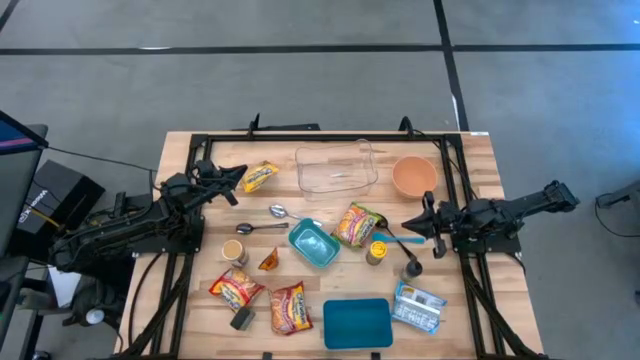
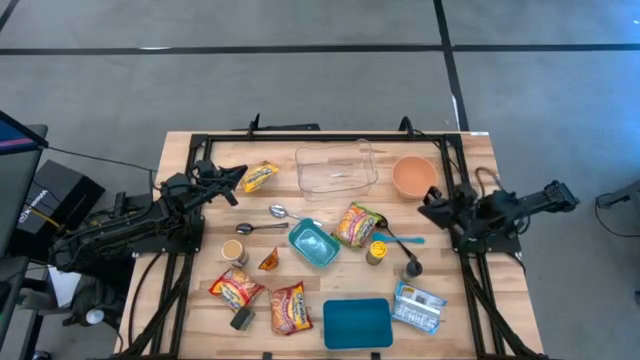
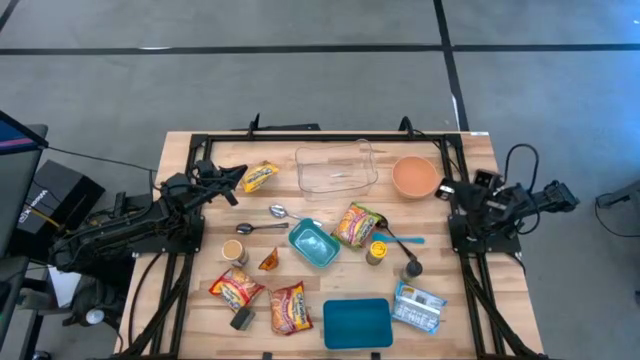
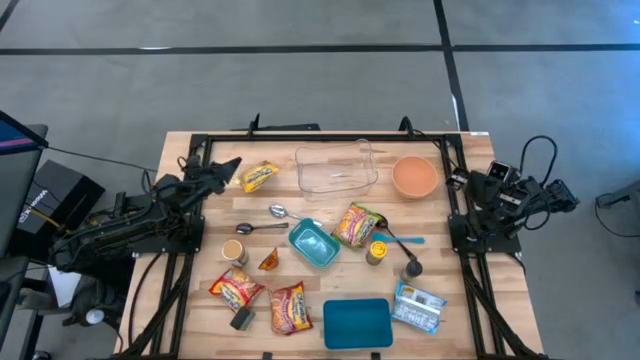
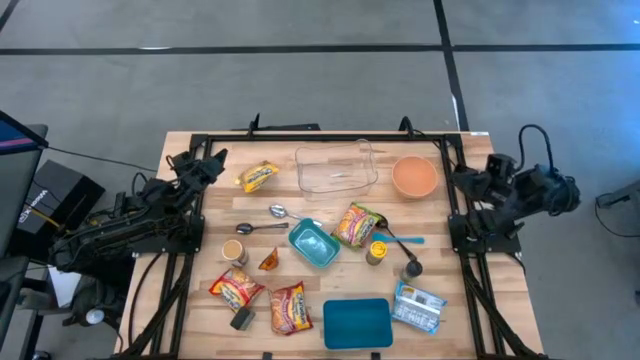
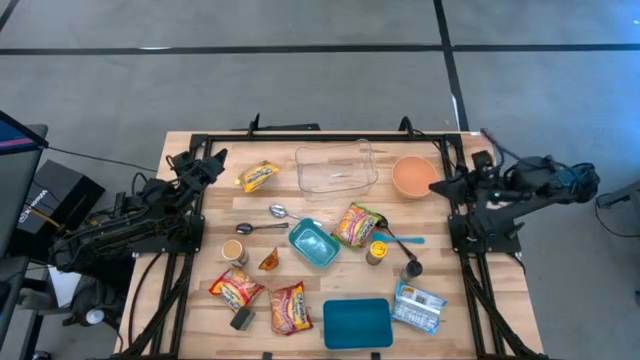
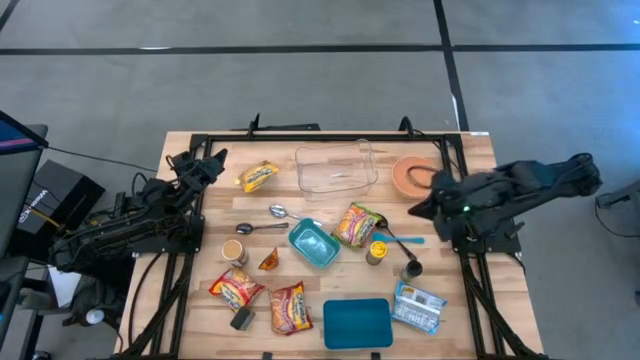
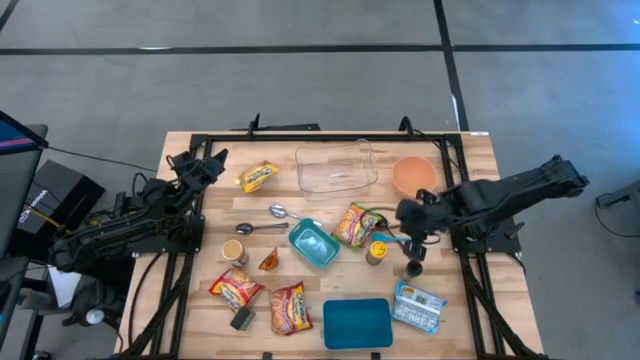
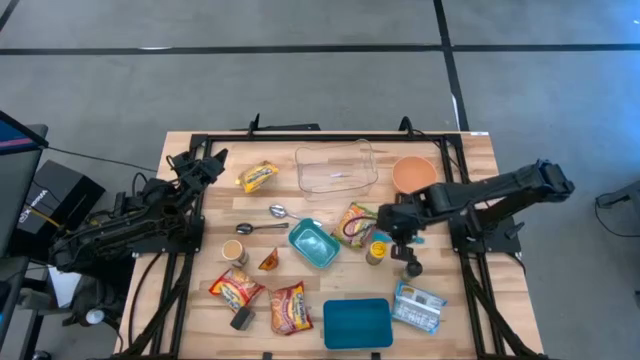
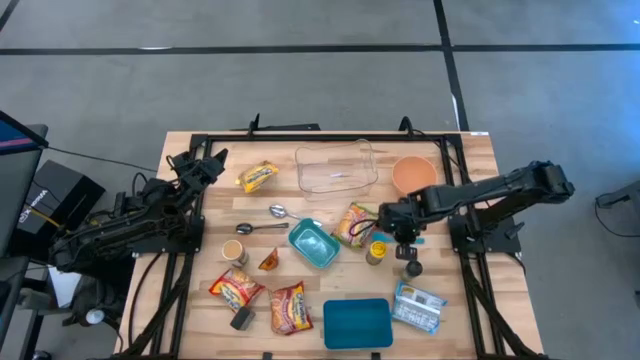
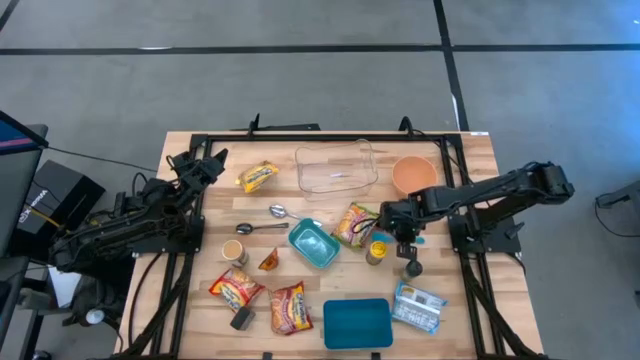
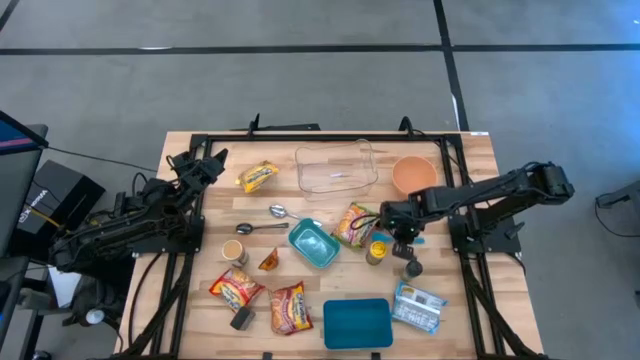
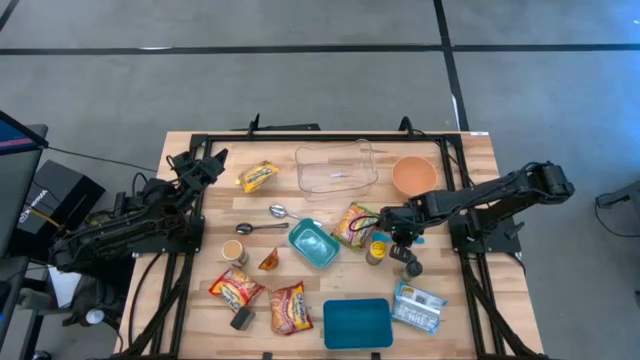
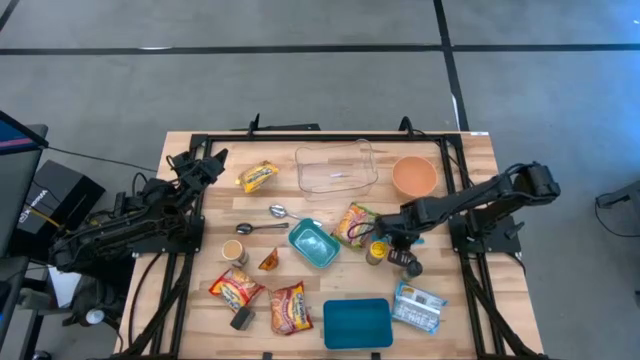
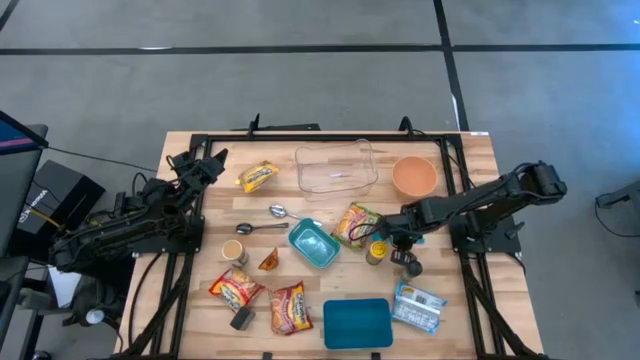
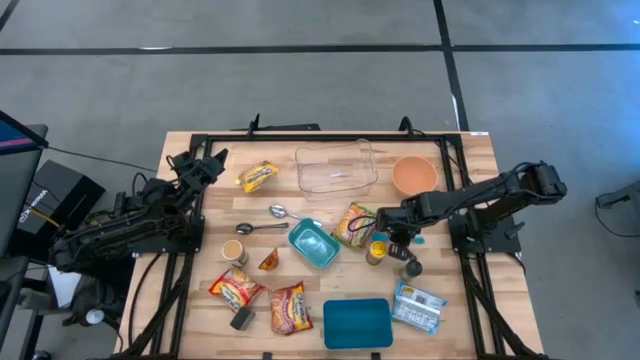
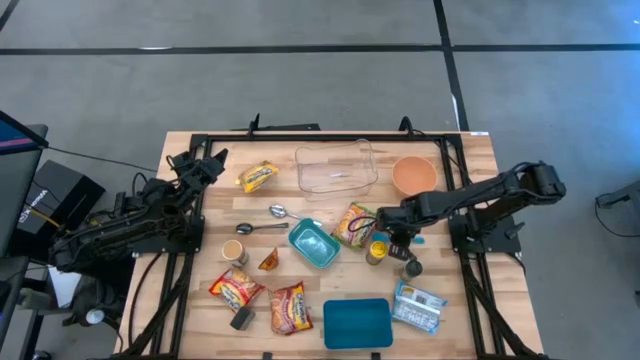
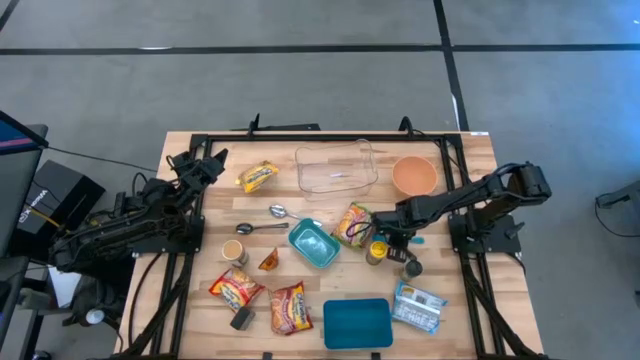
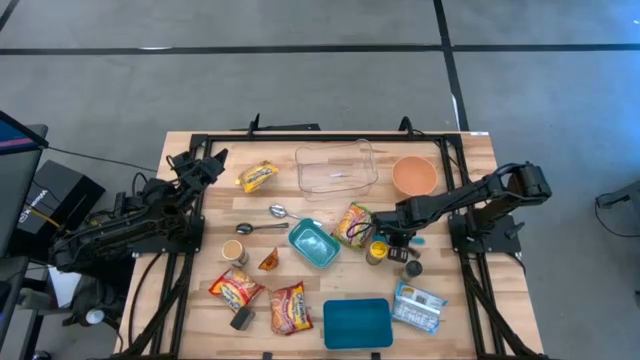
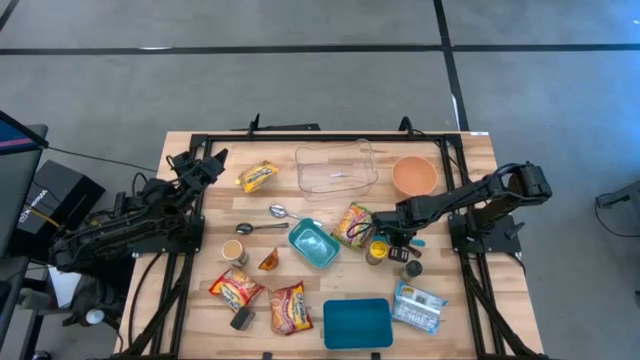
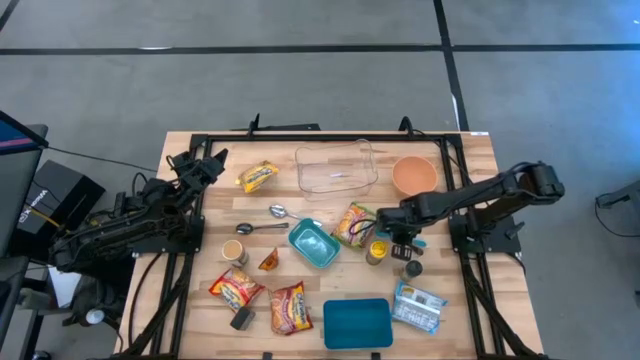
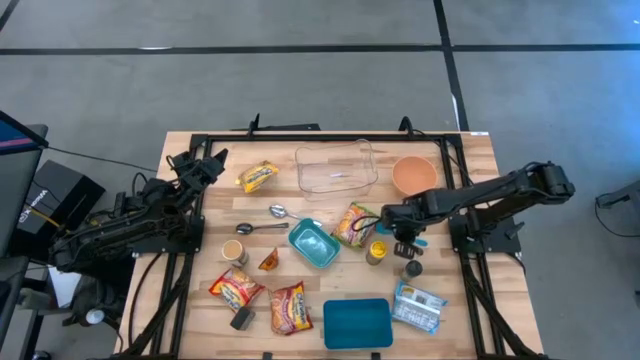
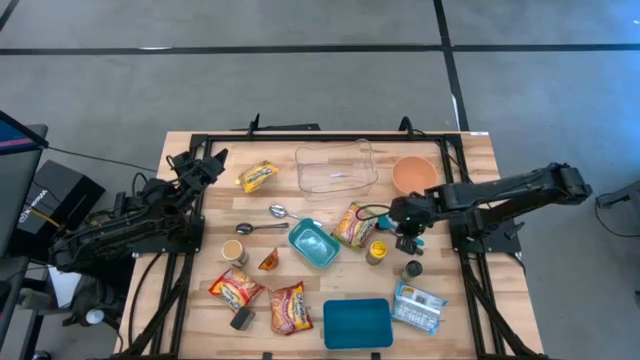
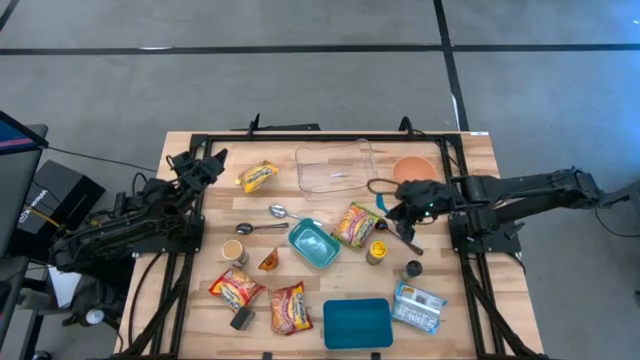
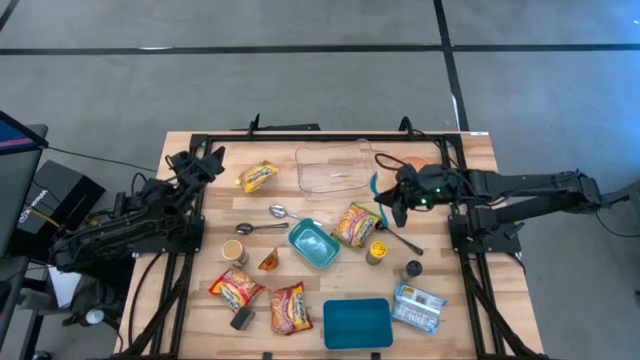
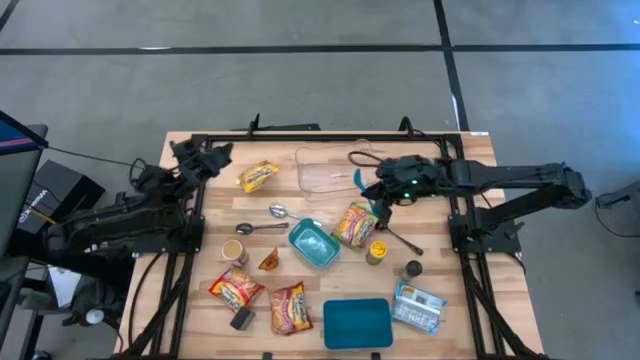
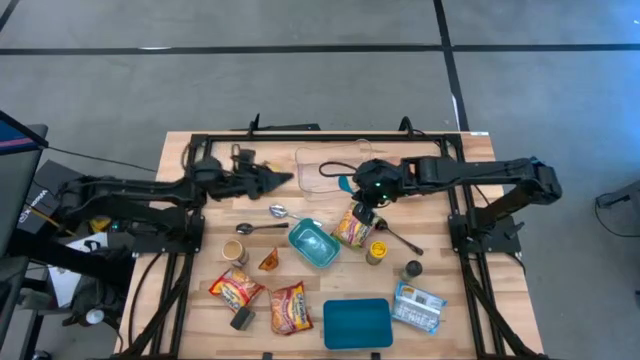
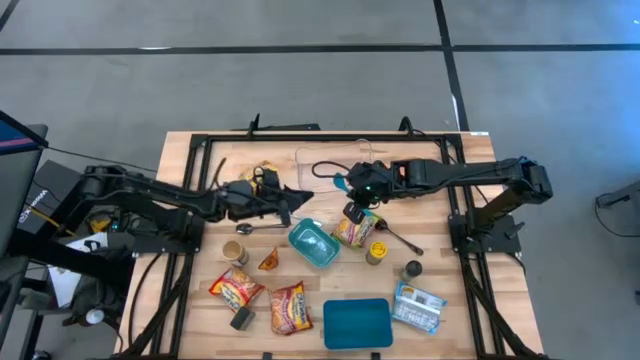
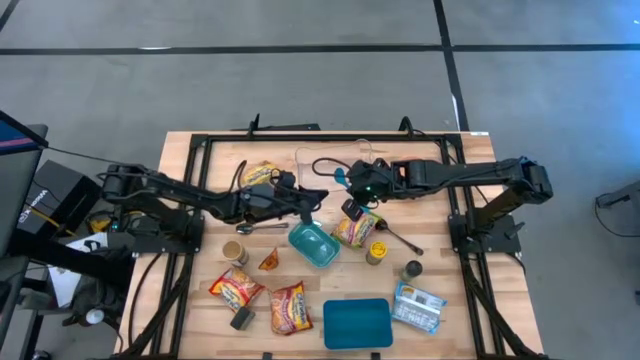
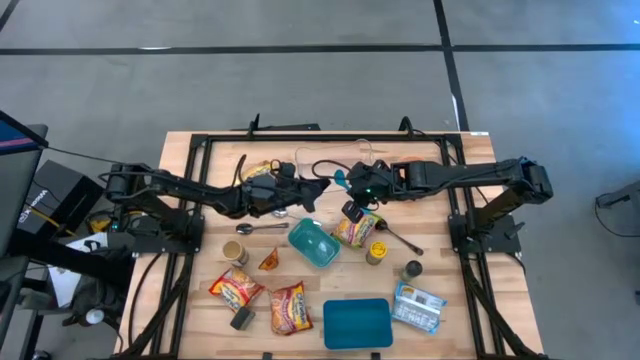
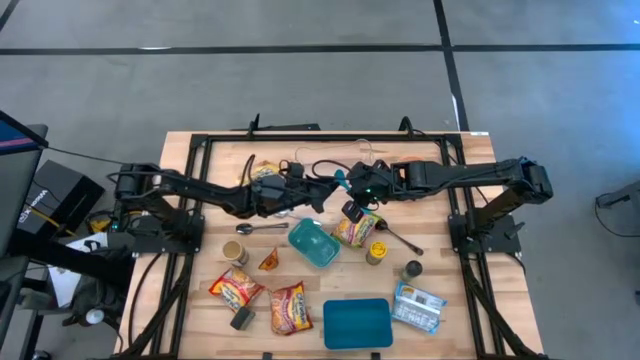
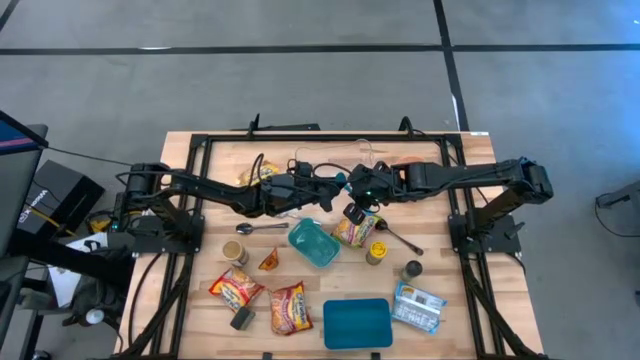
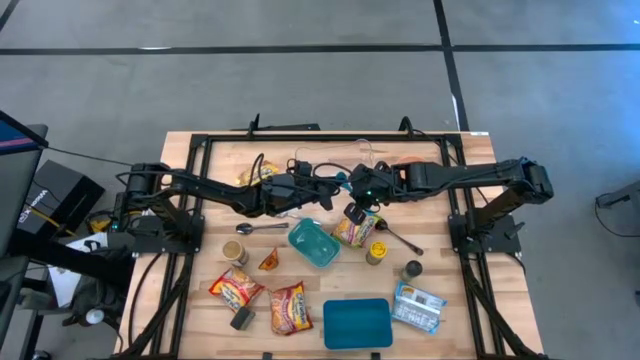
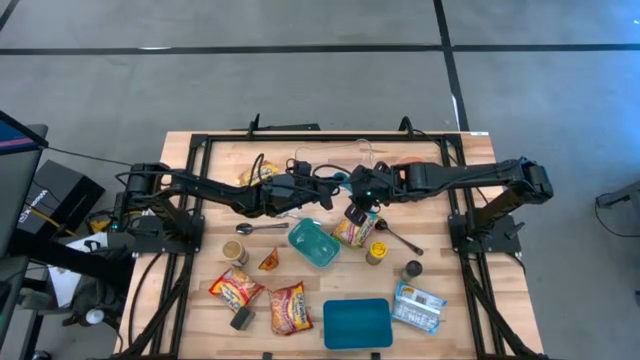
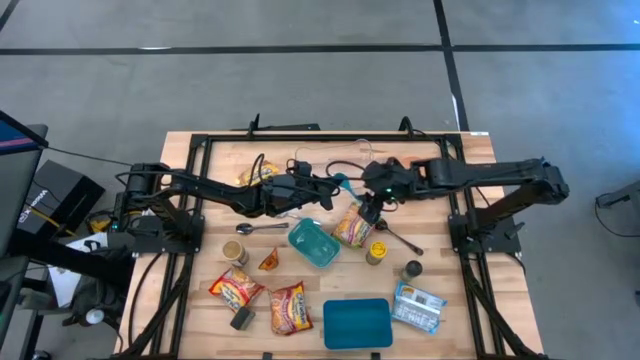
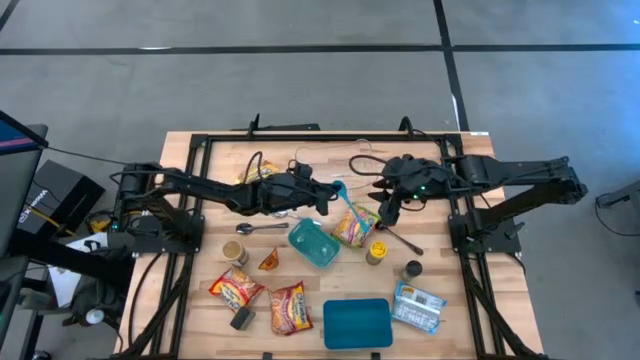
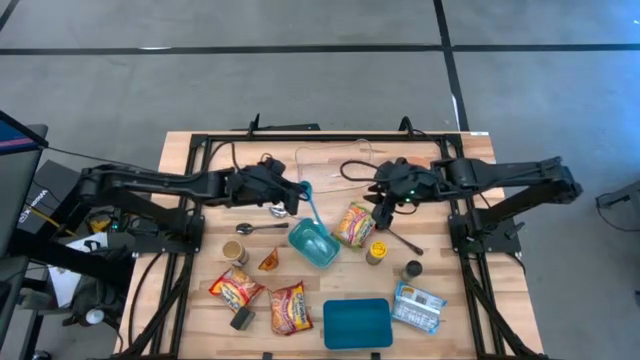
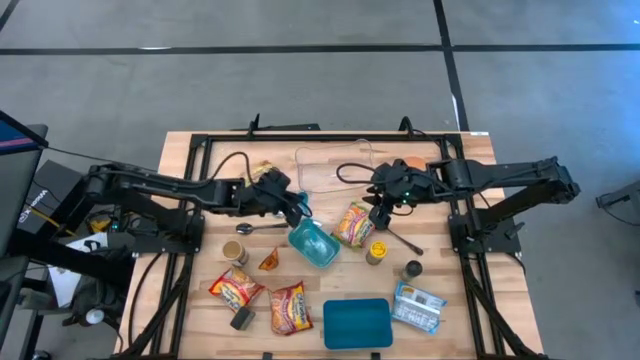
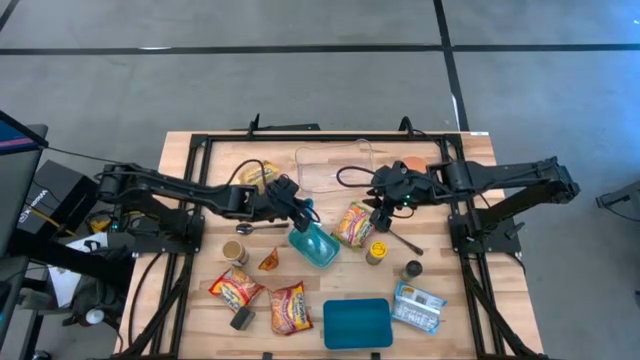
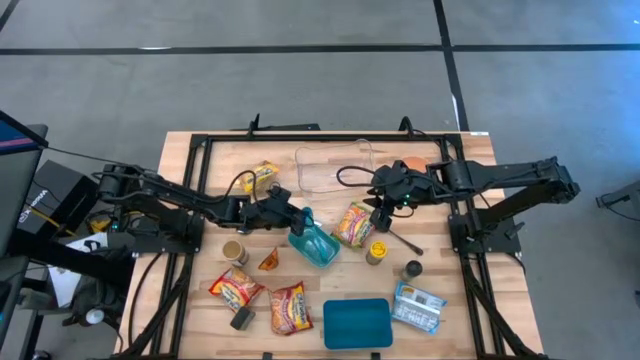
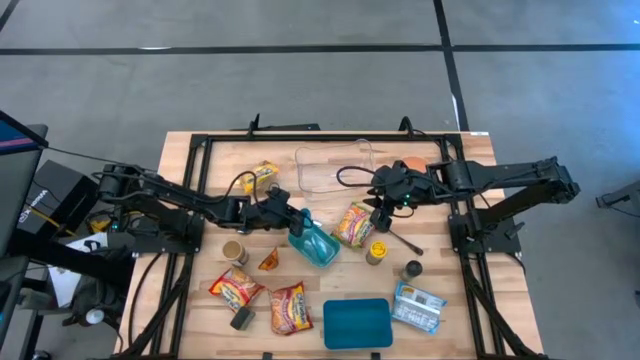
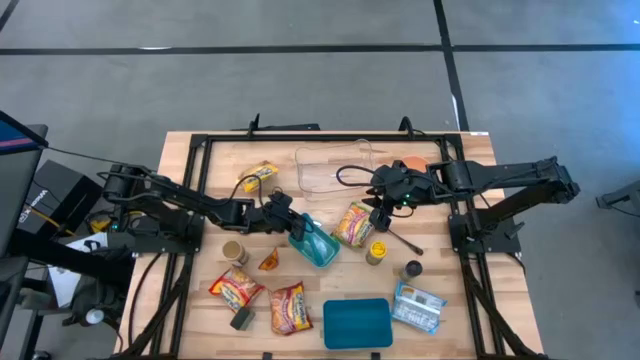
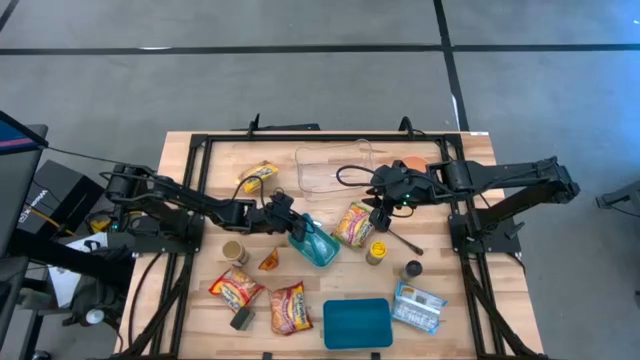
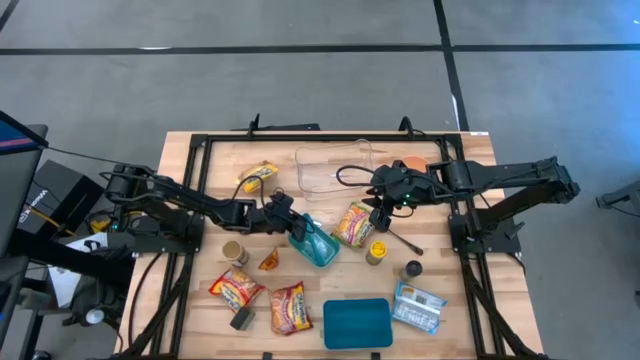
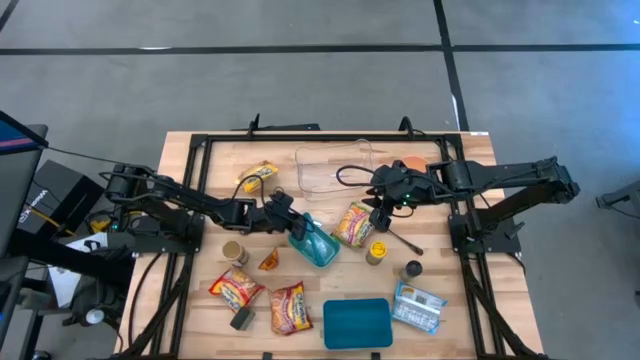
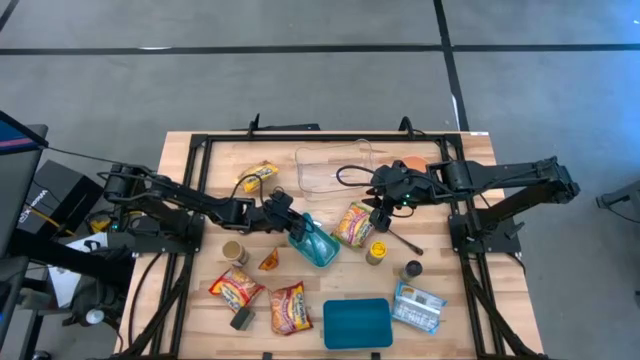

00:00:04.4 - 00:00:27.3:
Task: Pick & Place Food Item
Put the blue baby spoon into the green bin
